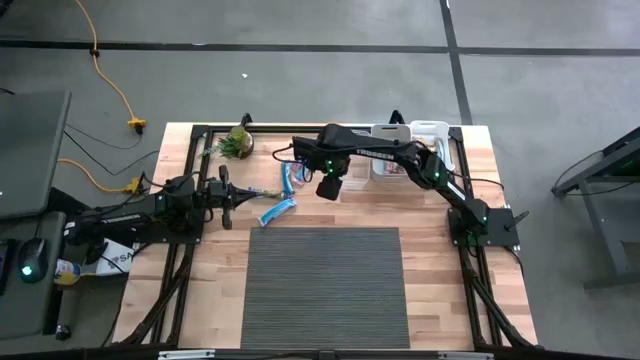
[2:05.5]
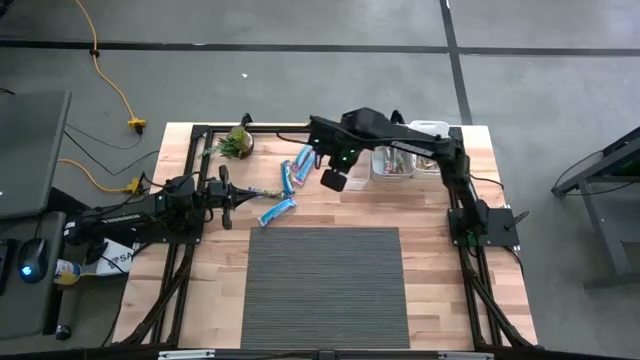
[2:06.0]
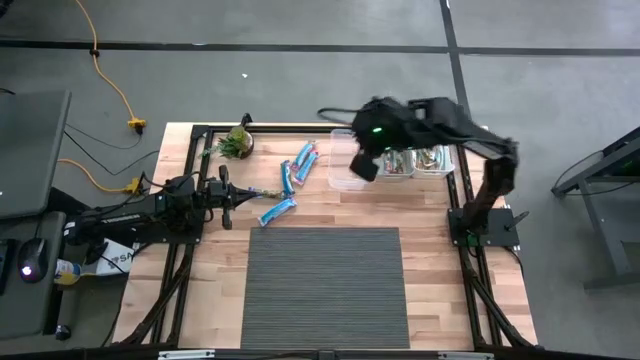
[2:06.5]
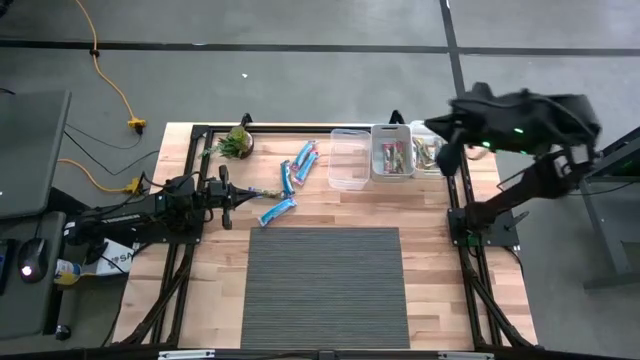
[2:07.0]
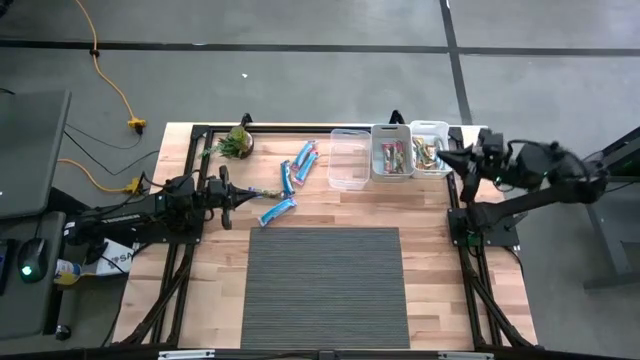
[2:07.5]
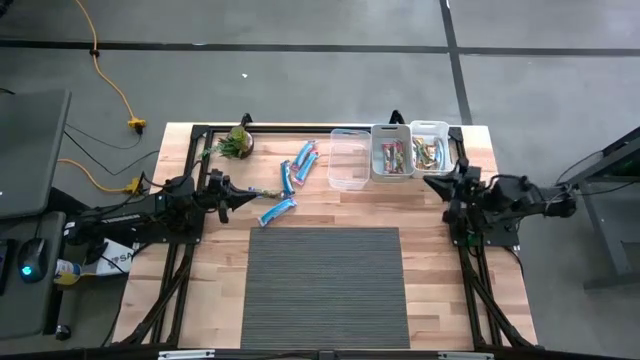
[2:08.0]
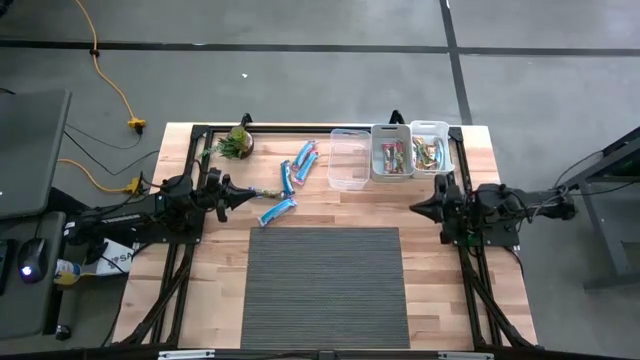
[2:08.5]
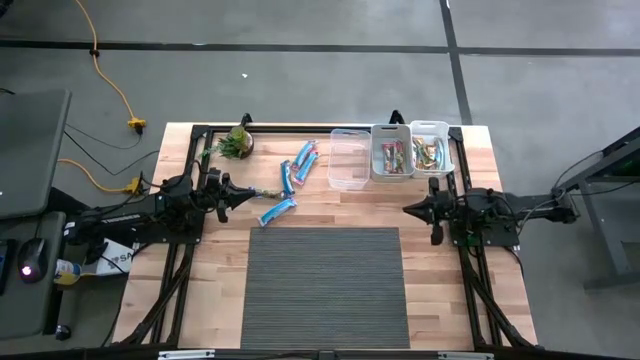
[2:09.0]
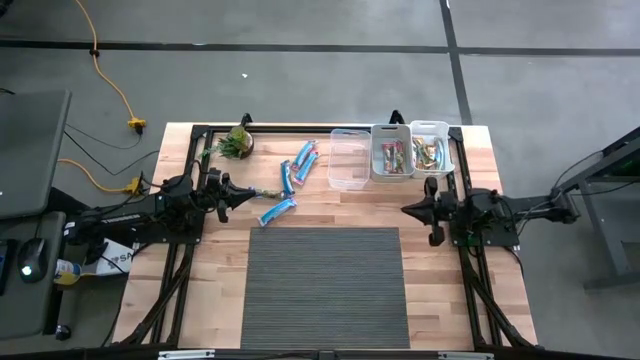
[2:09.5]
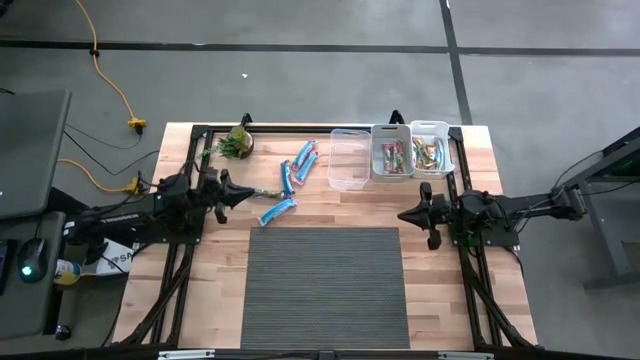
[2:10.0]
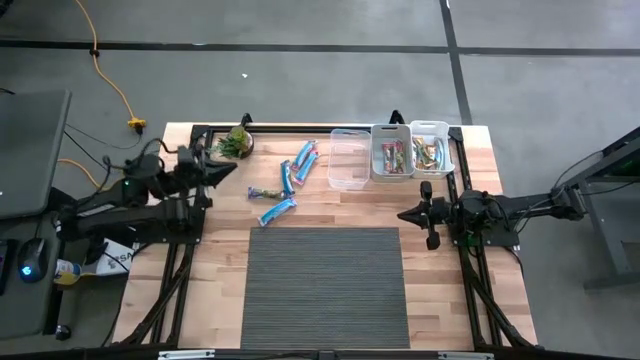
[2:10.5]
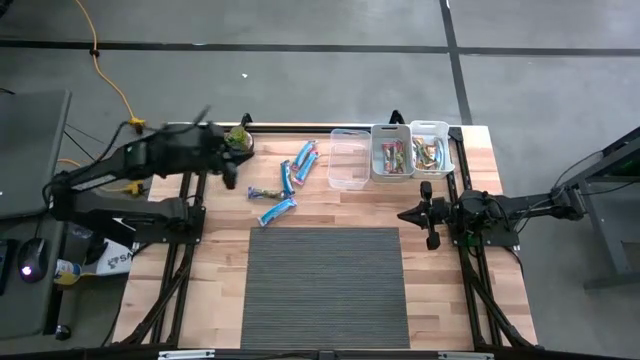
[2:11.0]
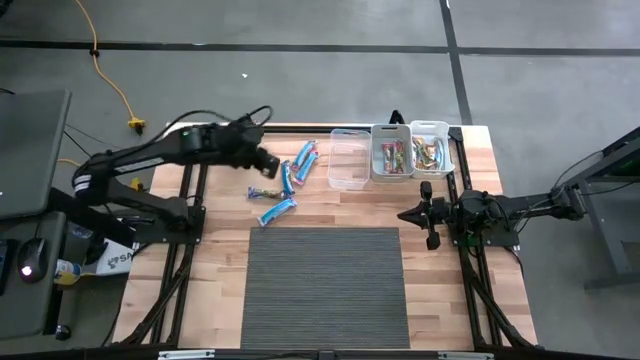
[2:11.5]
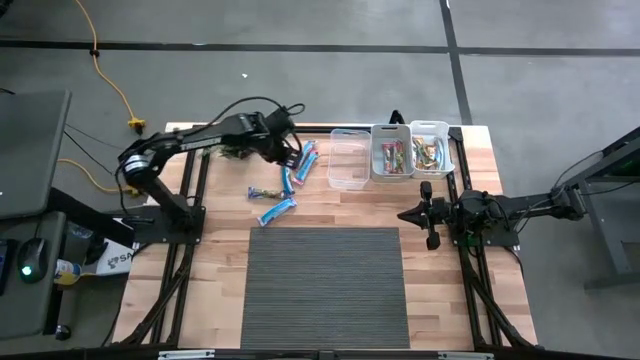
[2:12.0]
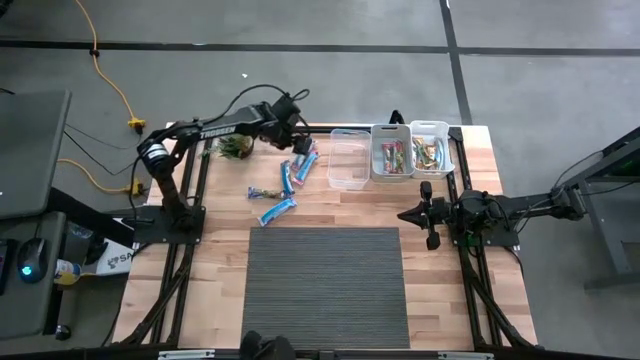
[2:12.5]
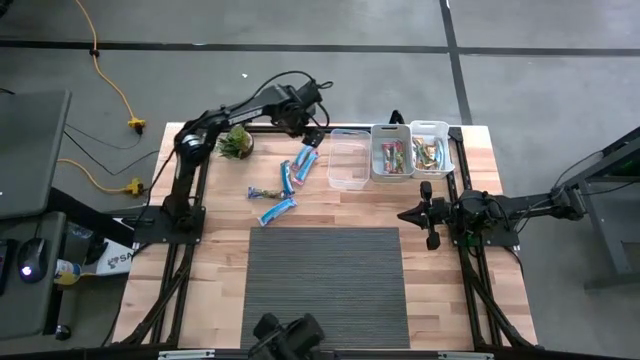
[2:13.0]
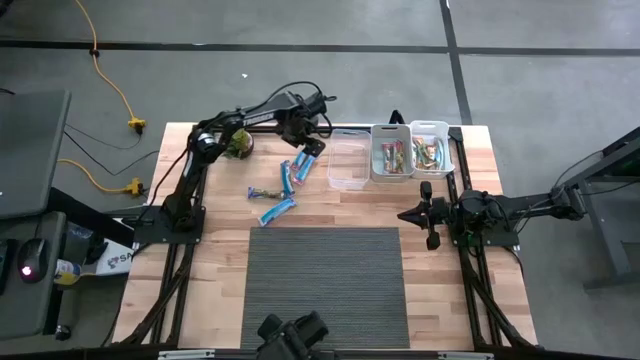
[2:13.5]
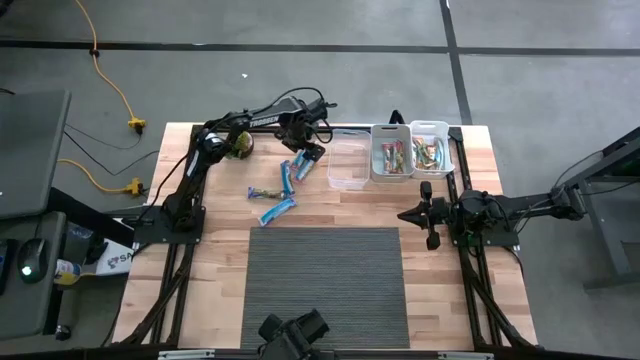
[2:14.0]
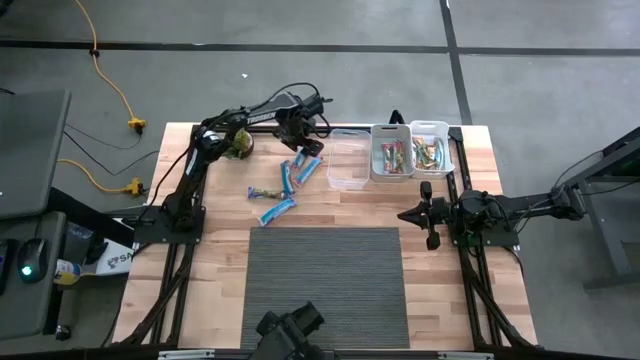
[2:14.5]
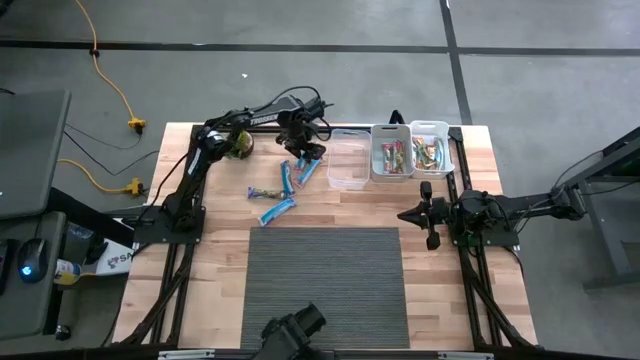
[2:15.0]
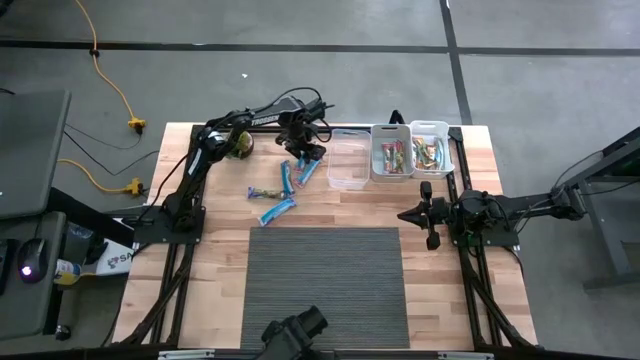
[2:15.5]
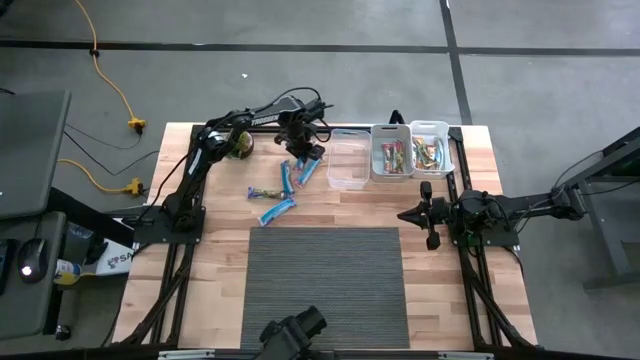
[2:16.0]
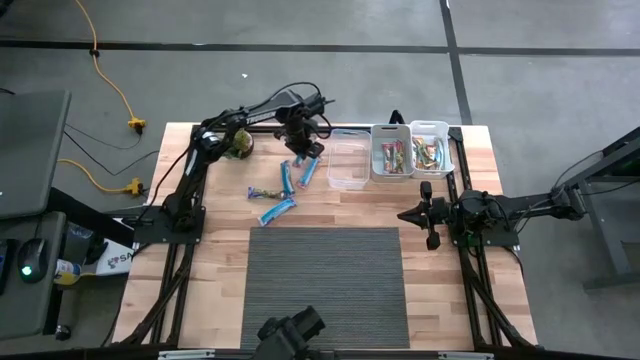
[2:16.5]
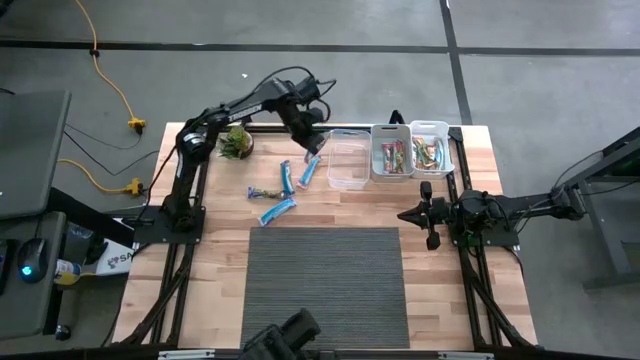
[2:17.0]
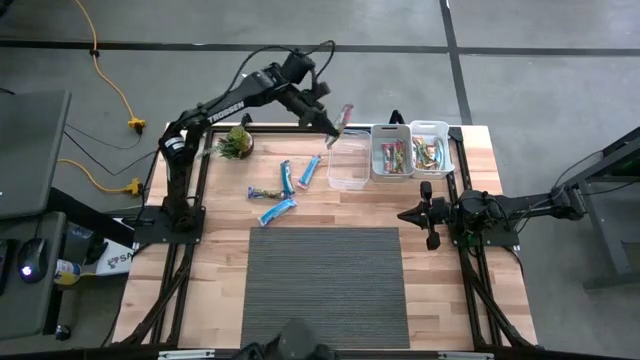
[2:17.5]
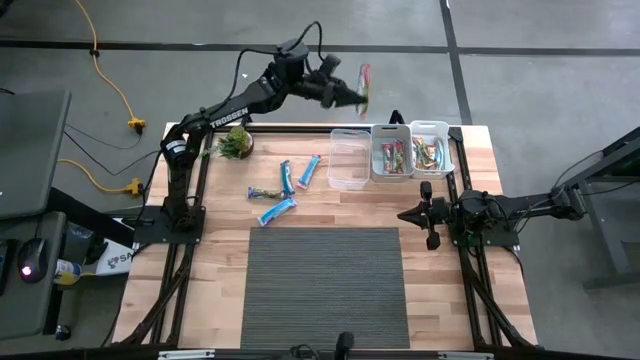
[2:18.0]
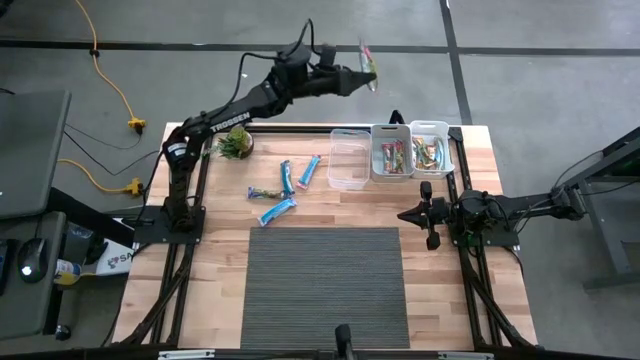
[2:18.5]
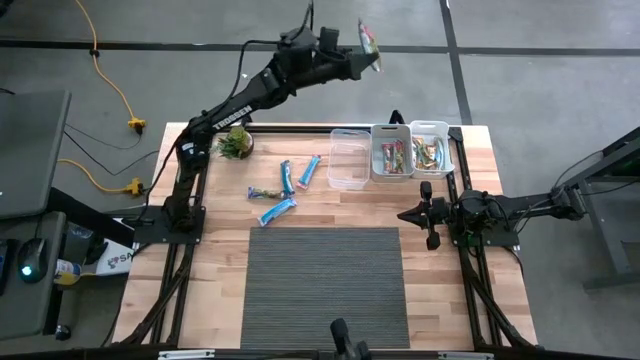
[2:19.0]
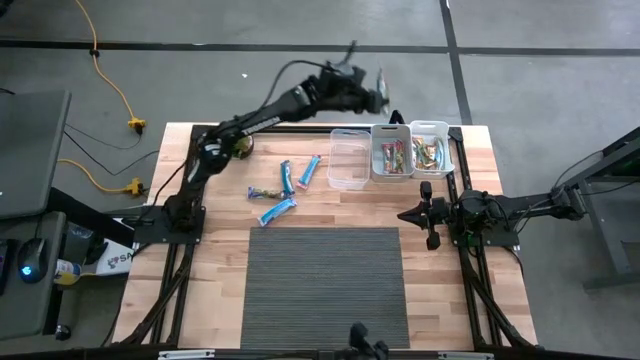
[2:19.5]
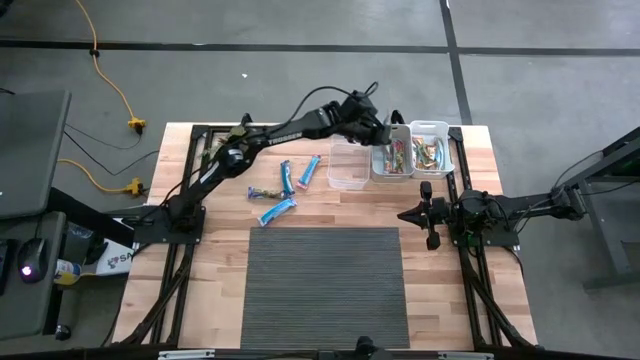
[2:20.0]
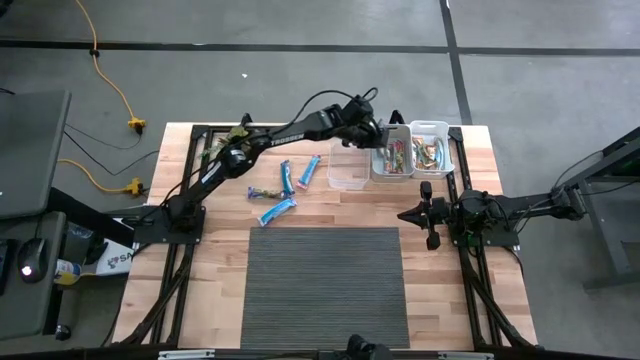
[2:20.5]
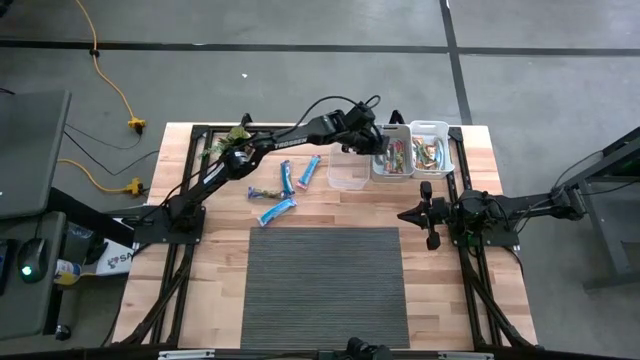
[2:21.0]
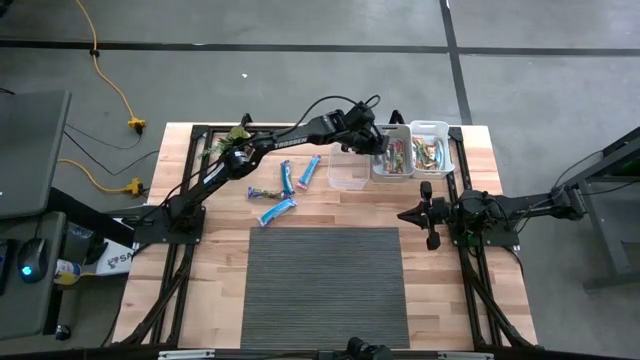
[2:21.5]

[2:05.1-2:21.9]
Task: Pick and place Granola Bars by type
Put the red granola bar into the gray bin

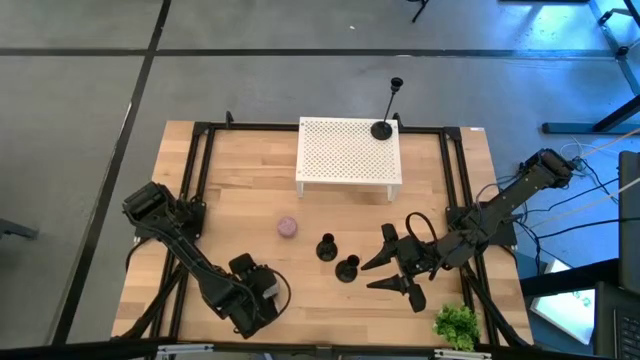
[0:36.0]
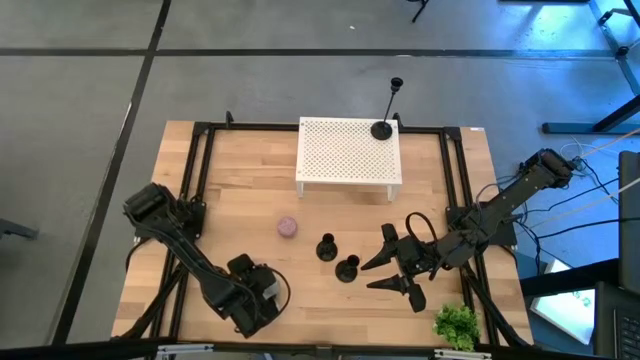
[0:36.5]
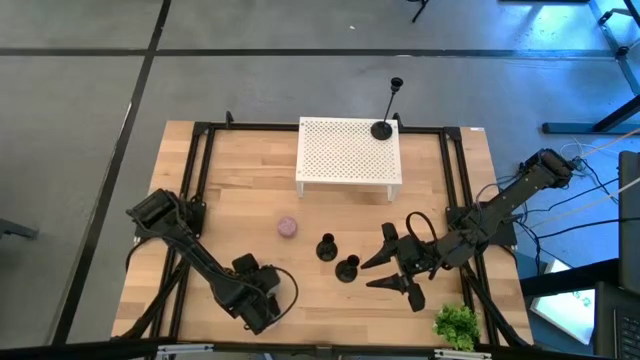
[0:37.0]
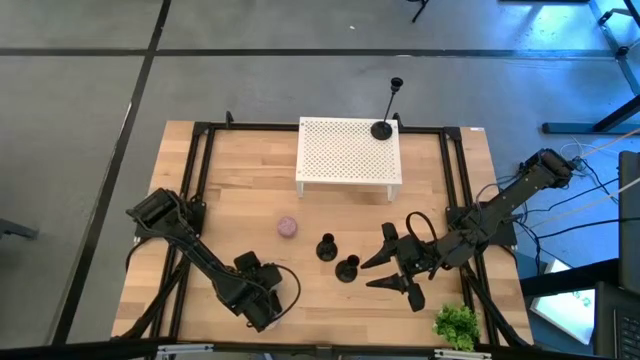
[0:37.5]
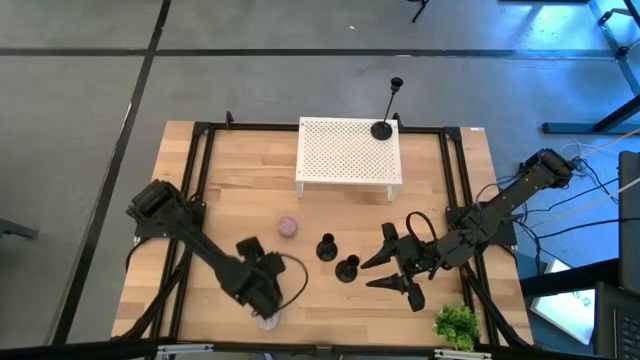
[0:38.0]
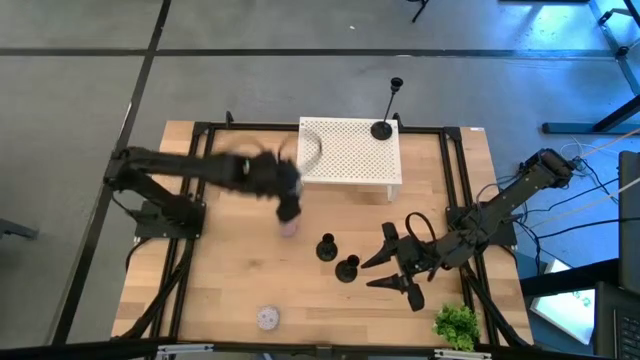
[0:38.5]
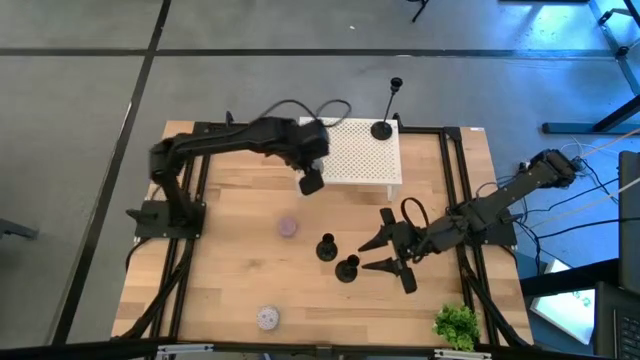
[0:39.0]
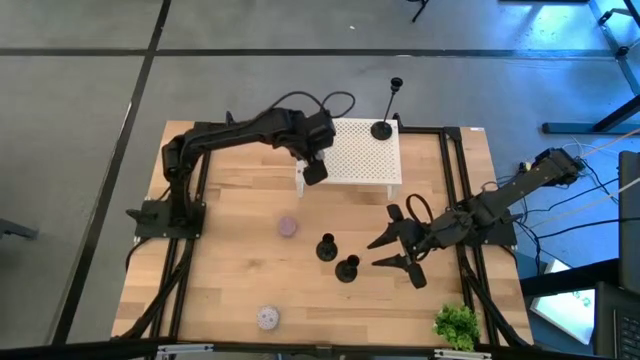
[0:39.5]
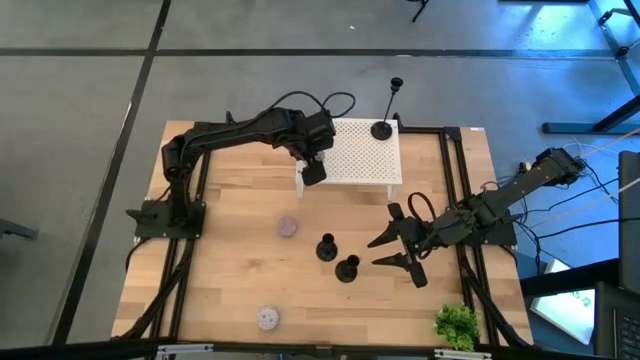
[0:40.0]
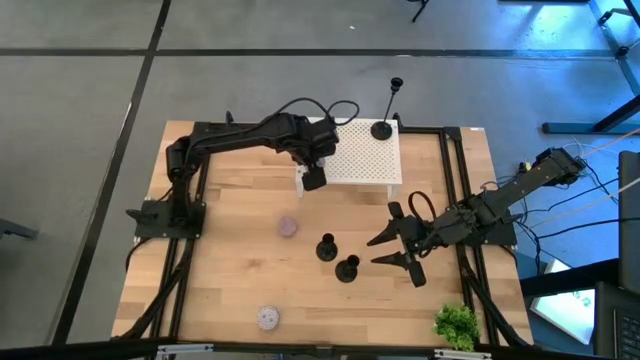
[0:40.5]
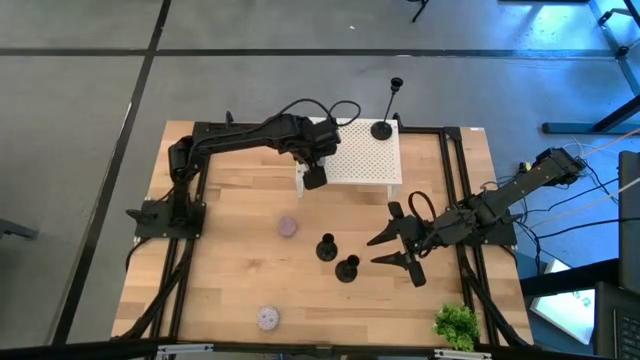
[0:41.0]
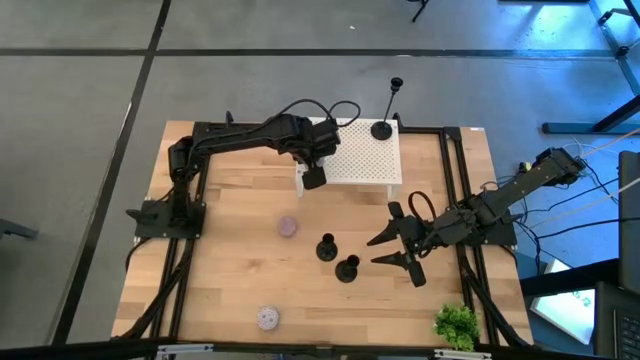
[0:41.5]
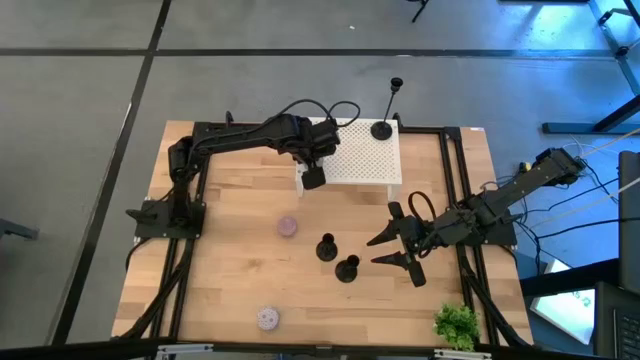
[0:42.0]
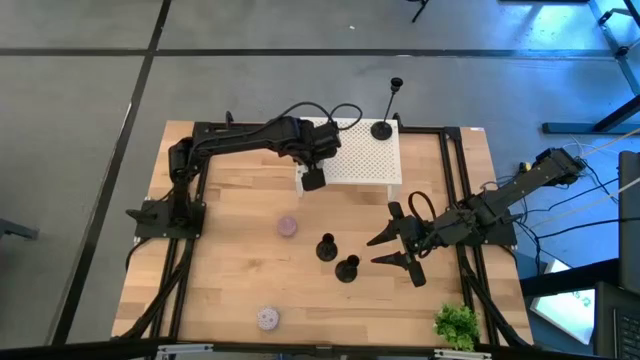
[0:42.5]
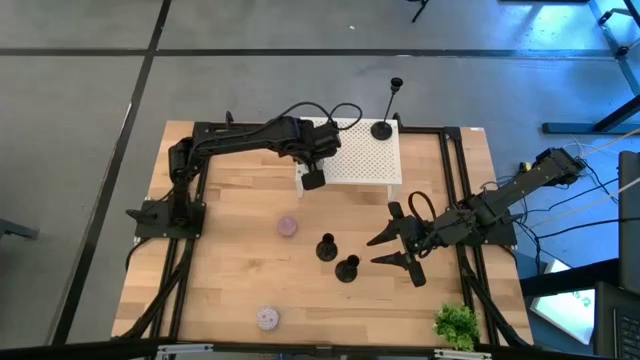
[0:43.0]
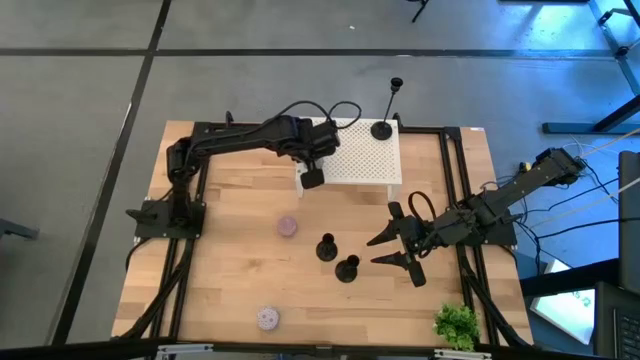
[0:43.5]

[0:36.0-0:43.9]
Task: Pick & Place candle stick holders
Put the blue scented candle on the shelf
